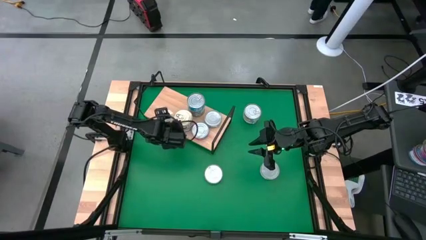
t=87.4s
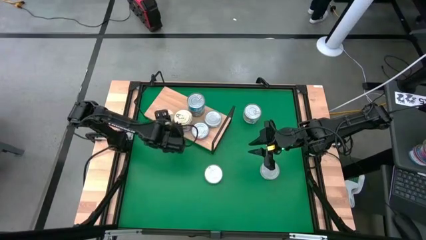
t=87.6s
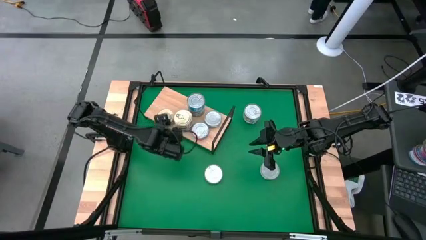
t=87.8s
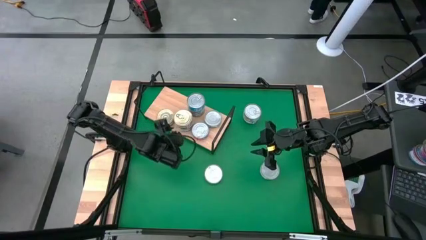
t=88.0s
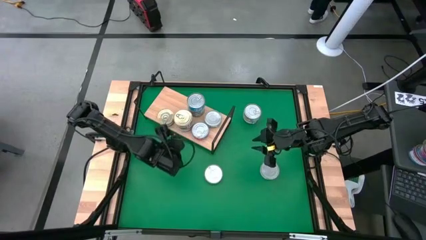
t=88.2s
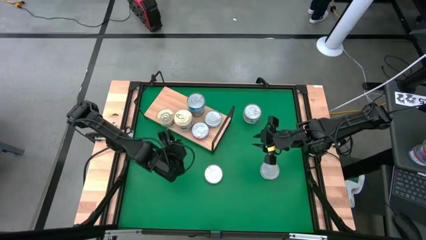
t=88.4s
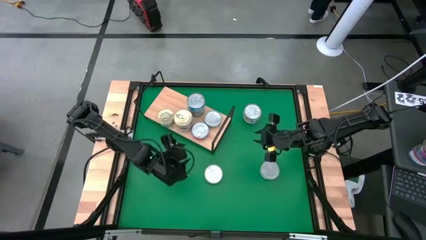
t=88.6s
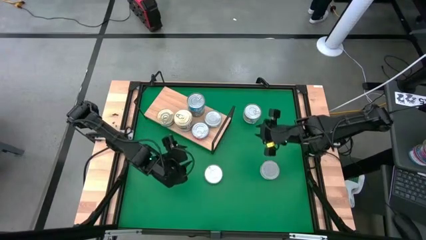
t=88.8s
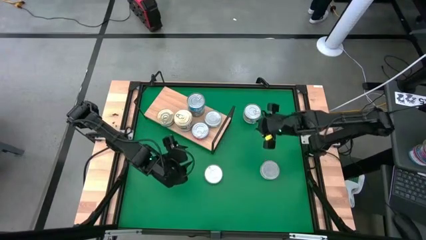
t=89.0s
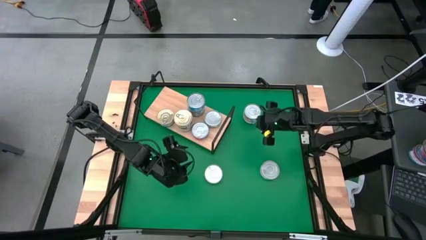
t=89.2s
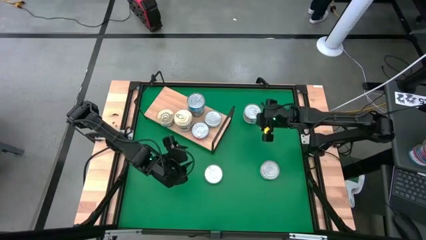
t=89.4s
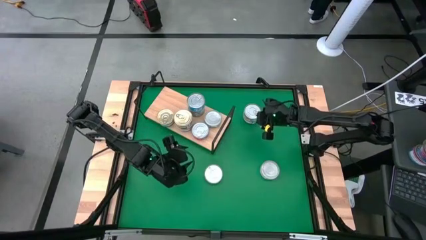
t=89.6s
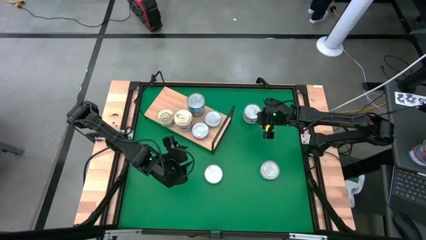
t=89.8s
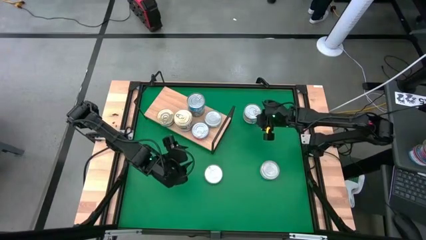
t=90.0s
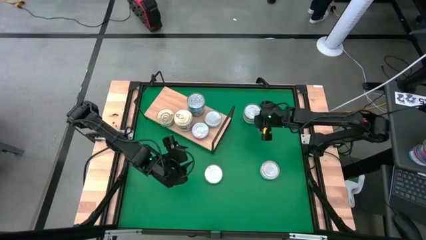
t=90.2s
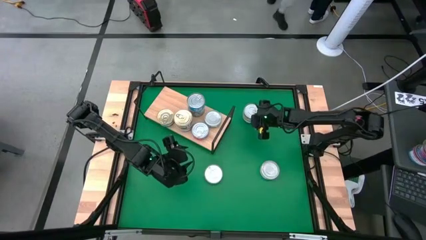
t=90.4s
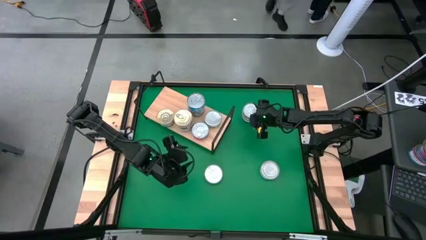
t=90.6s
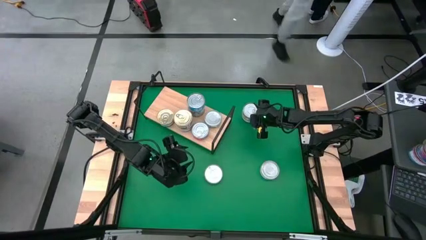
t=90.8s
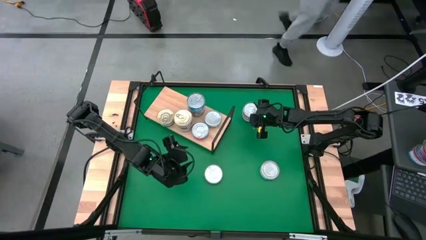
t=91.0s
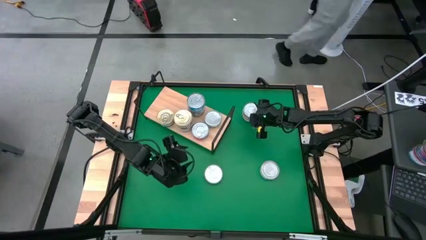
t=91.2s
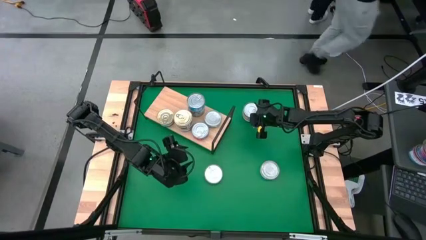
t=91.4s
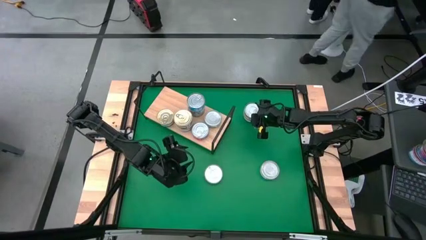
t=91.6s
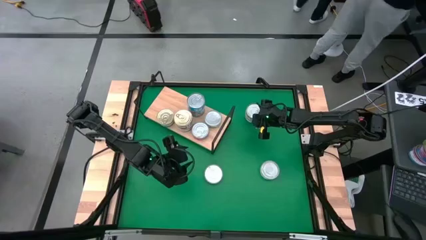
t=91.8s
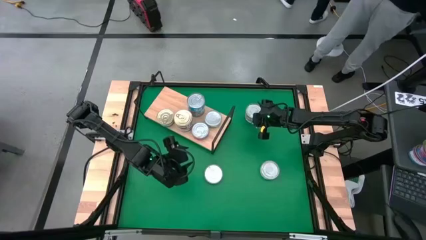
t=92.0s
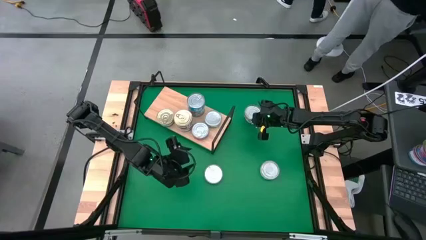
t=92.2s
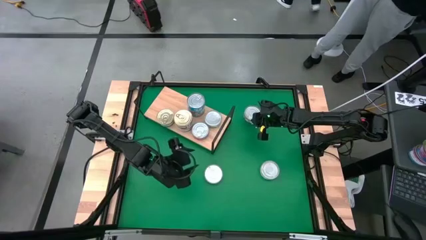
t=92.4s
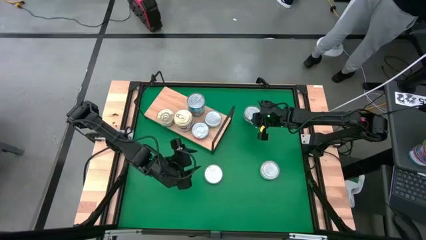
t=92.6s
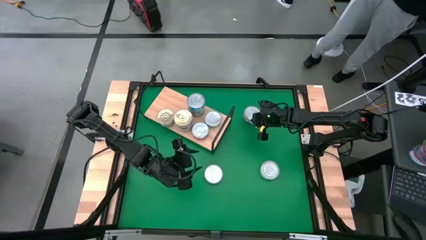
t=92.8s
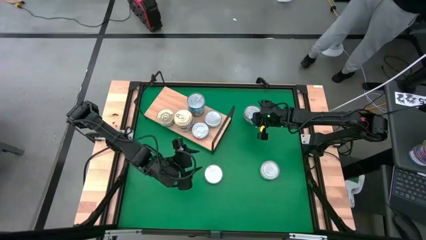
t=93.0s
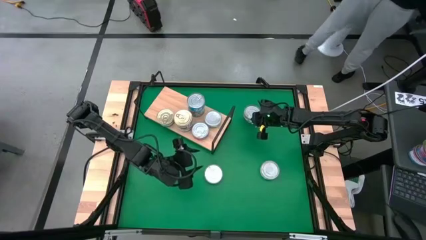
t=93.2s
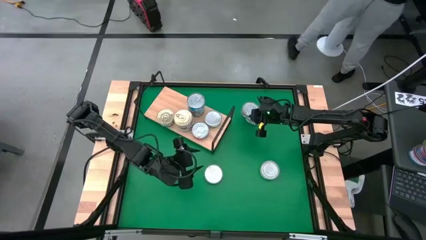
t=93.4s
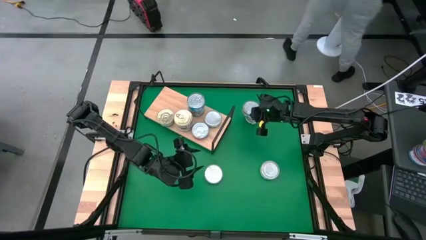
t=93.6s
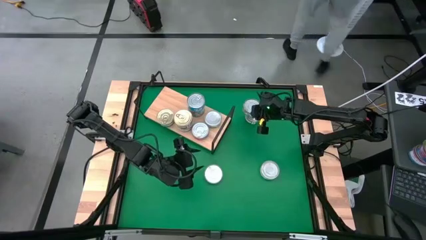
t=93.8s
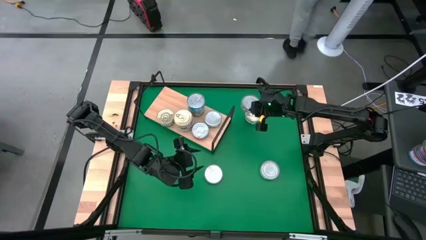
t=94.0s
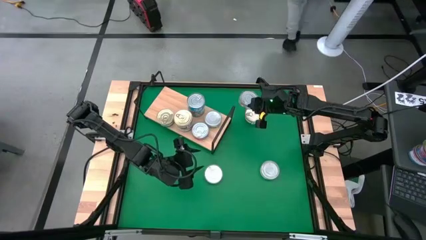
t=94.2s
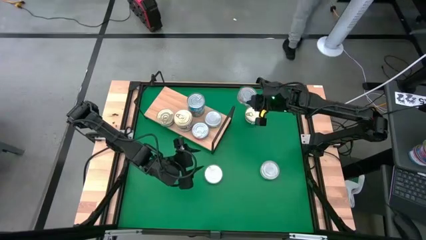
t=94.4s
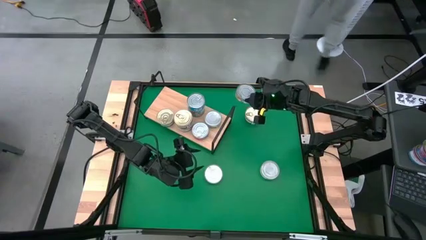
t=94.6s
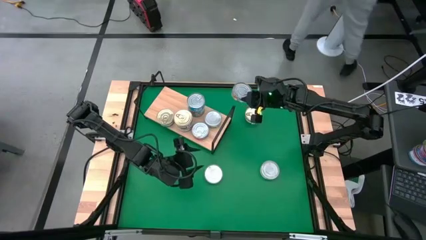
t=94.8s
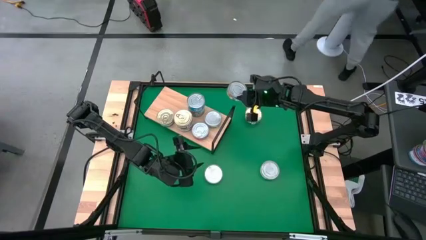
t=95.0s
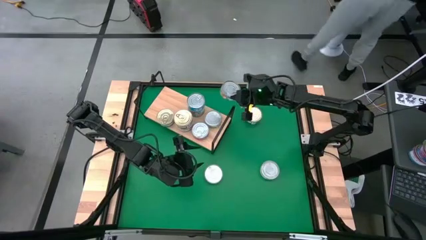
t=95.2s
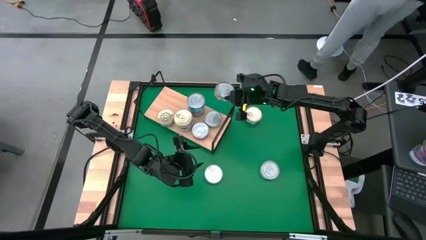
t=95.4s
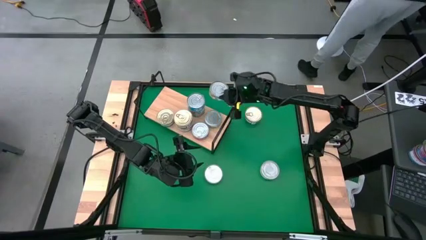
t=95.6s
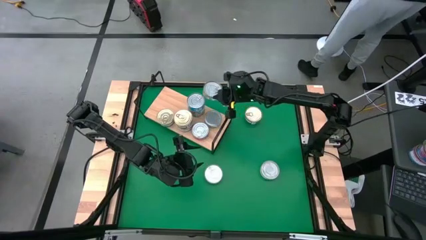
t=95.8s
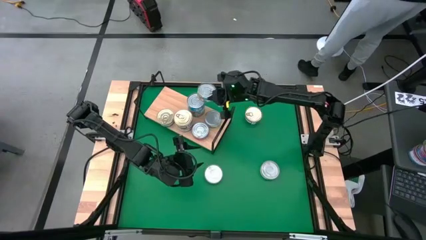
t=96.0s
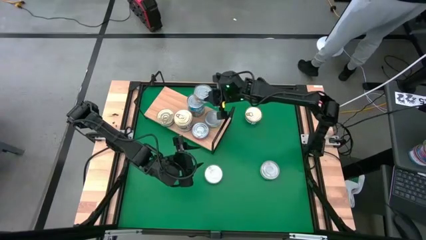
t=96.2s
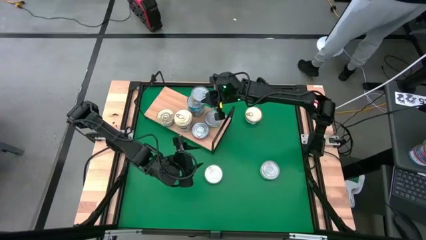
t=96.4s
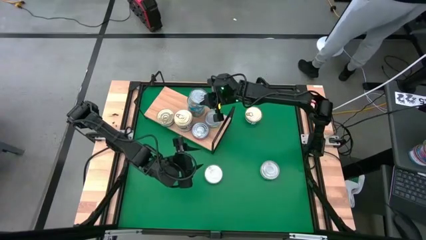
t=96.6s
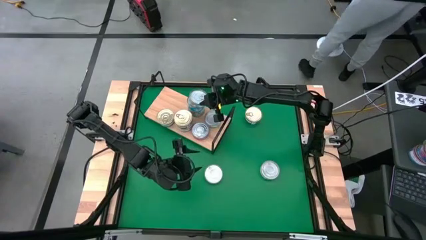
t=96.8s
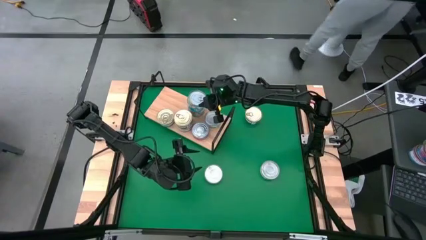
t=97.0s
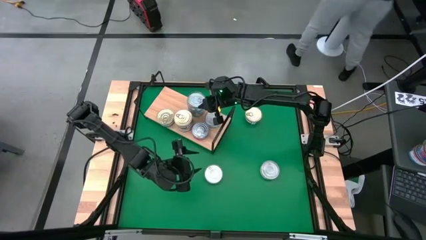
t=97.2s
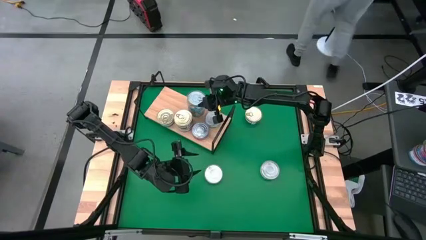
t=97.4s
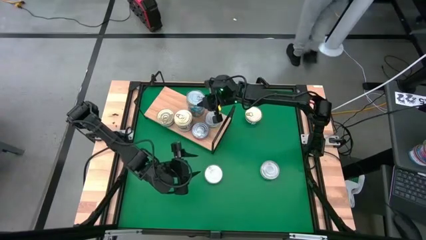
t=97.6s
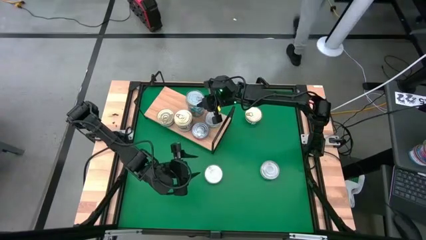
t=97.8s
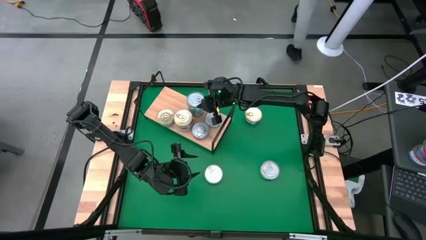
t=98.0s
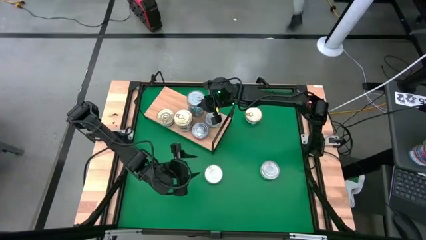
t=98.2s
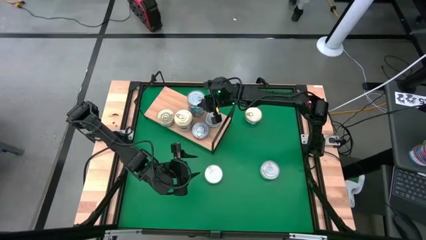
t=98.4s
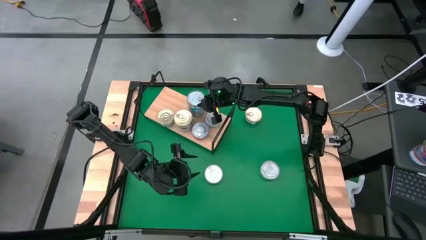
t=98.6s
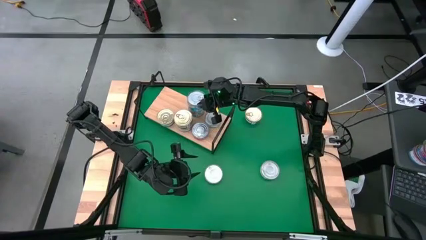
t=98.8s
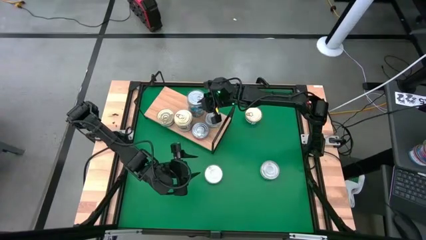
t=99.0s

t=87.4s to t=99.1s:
Task: Stack canned seafood by type on shelf
Stack the sky blue tuna can on top of the sky blue tuna can
